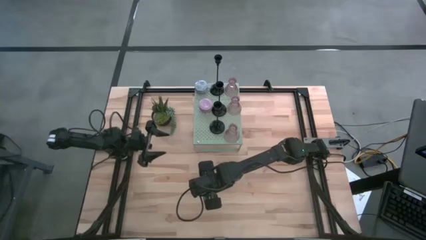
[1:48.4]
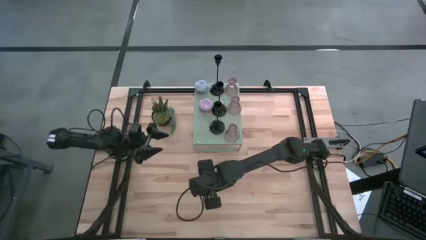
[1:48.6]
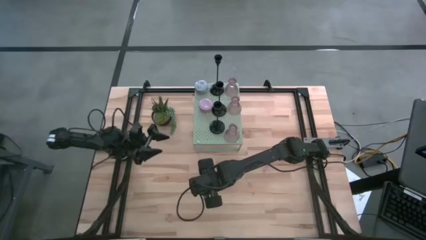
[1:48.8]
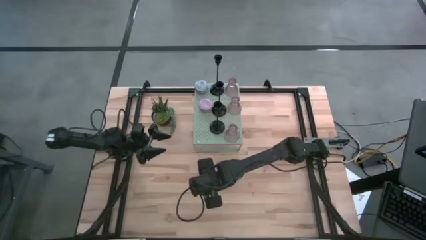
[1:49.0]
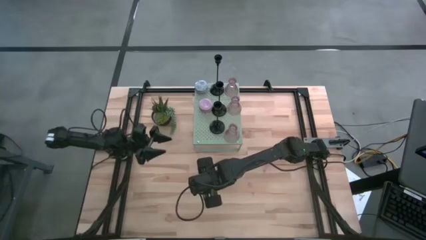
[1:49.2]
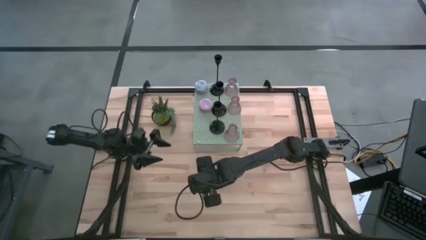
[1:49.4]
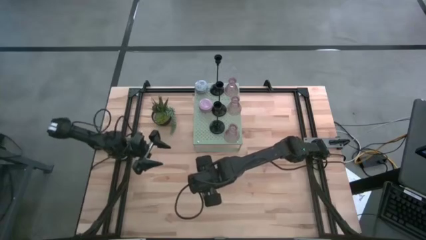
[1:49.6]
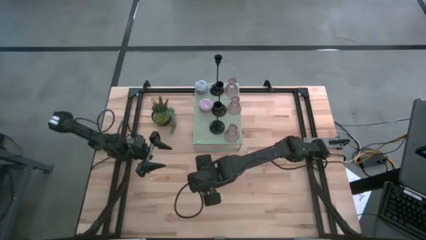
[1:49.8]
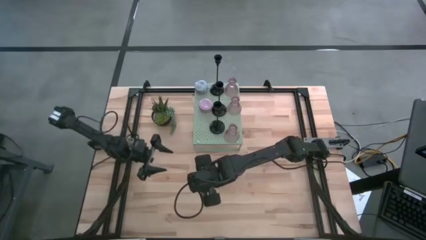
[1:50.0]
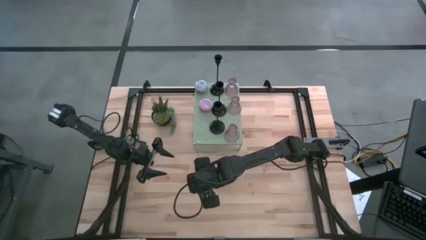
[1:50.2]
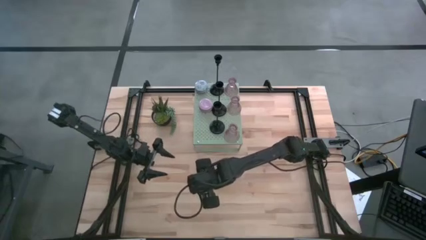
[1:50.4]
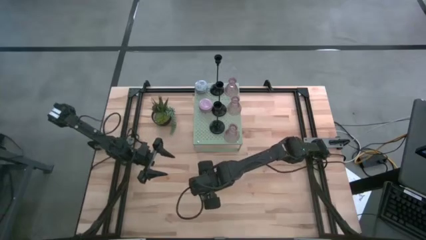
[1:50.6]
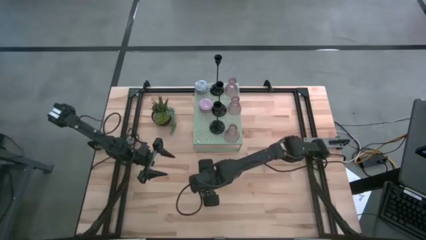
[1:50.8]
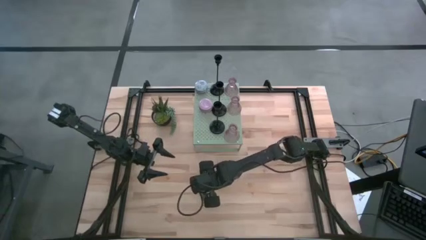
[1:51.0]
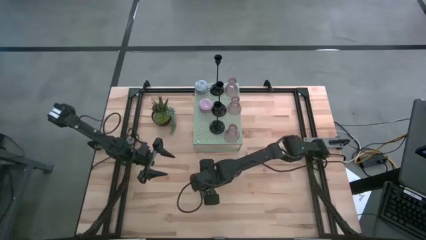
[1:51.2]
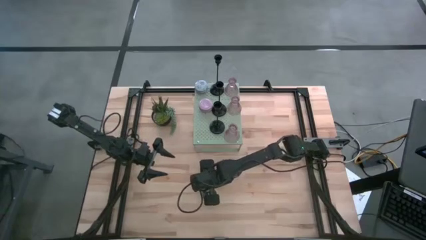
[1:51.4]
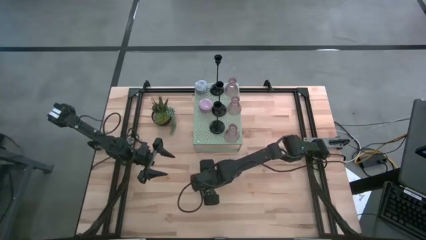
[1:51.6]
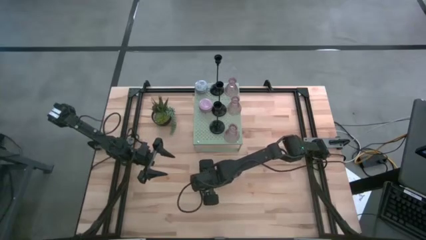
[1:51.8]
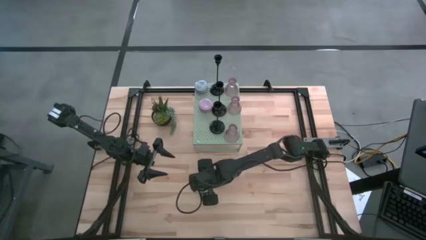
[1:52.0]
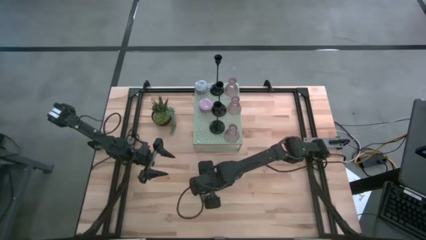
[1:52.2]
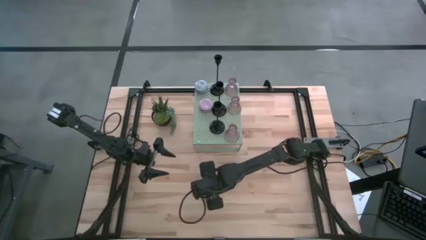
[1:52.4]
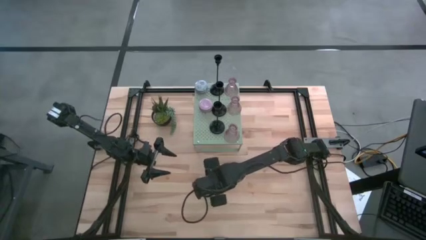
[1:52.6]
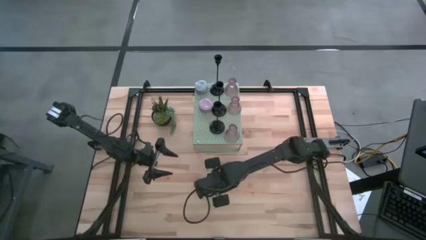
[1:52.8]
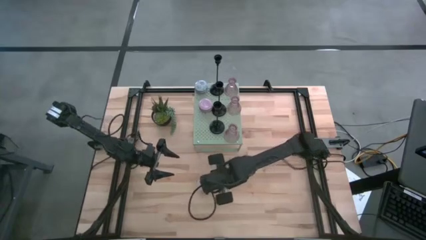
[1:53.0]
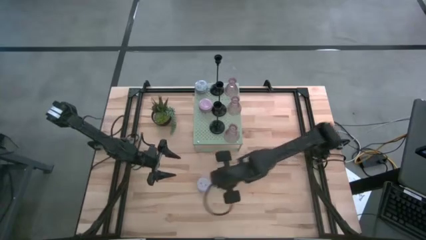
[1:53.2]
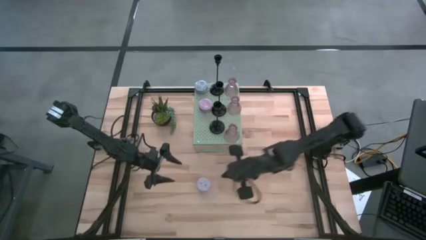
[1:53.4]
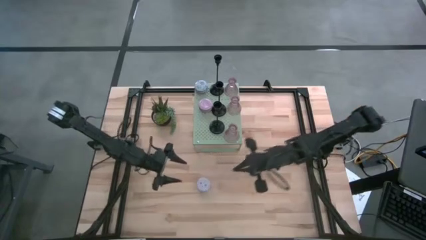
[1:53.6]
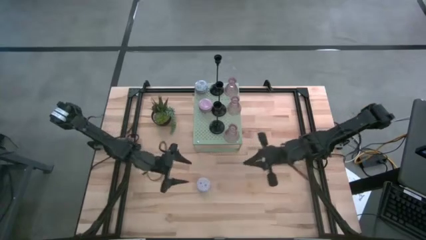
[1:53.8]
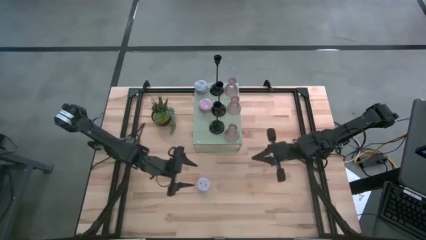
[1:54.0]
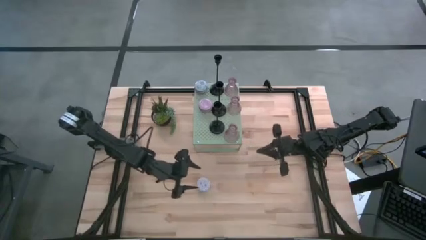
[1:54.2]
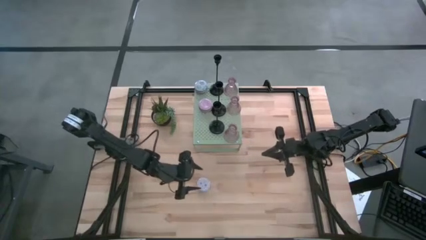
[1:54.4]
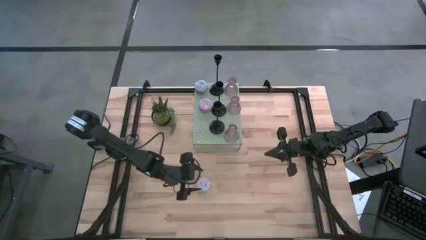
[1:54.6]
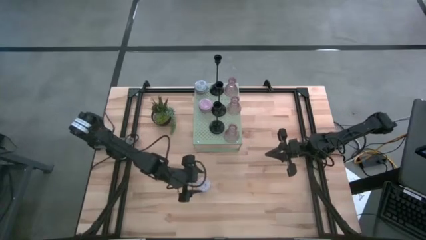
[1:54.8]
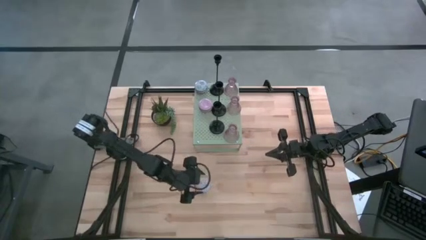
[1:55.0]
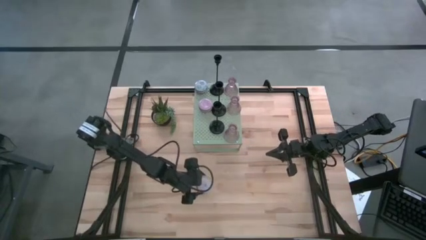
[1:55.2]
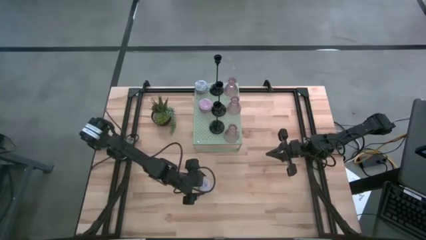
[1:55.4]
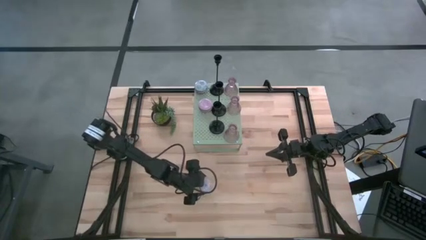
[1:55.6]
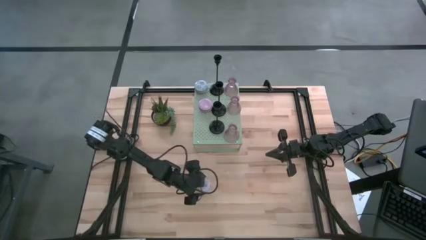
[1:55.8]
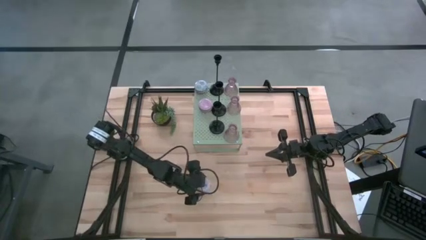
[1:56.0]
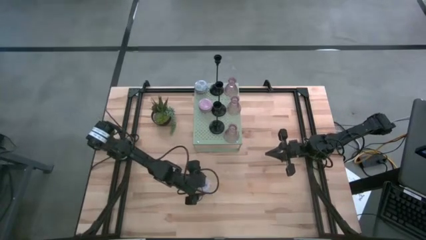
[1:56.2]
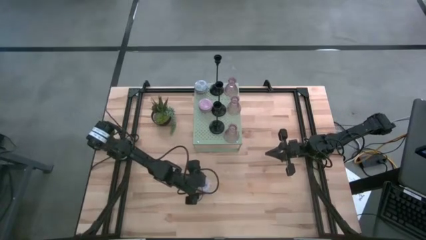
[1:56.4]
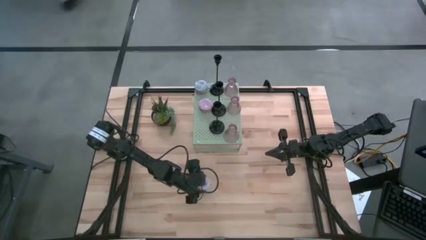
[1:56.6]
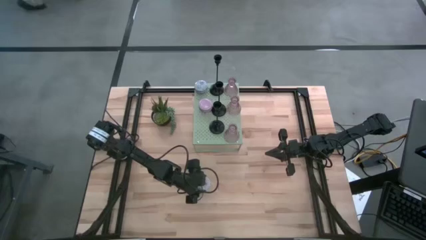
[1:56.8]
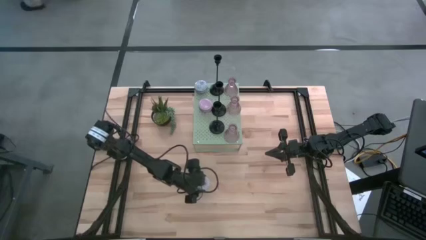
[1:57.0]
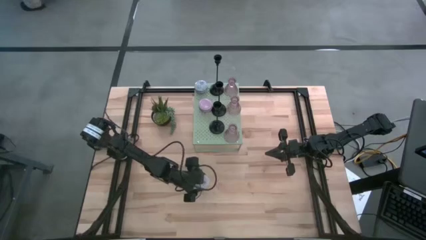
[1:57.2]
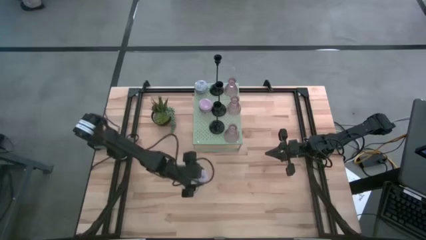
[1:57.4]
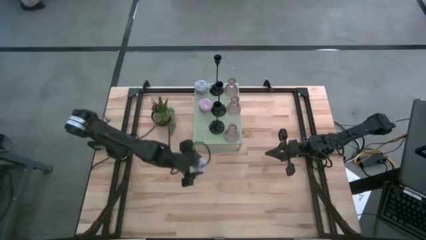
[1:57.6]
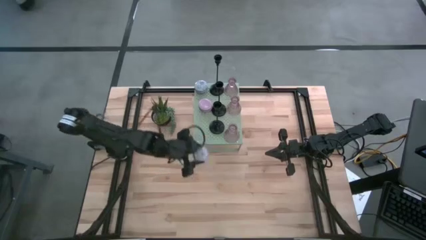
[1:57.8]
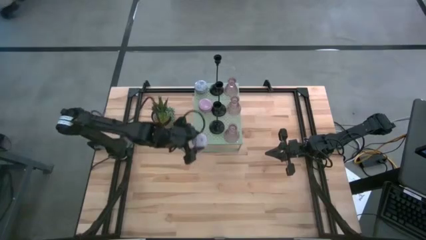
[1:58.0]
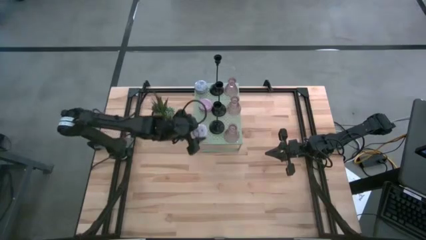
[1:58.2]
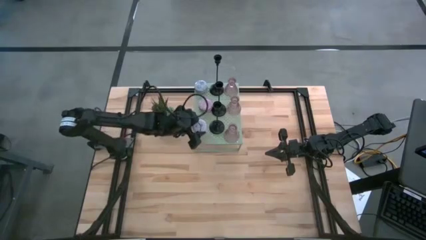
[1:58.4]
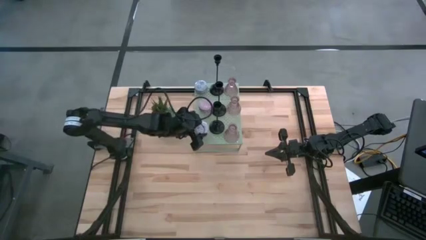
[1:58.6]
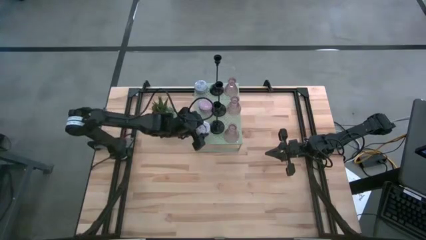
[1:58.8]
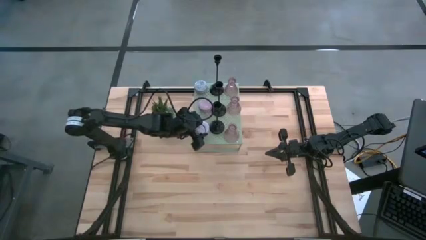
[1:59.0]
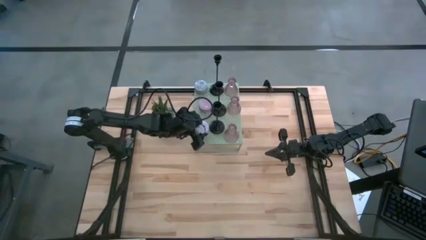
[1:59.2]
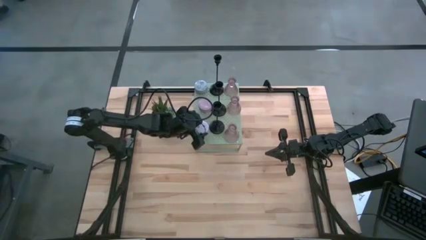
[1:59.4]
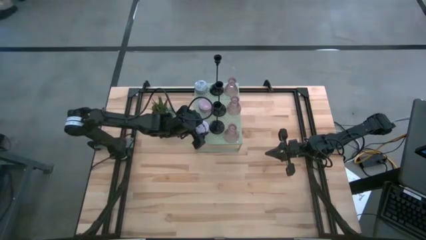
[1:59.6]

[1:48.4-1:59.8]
Task: Pick & Place candle stick holders
Put the red patterned scented candle on the shelf

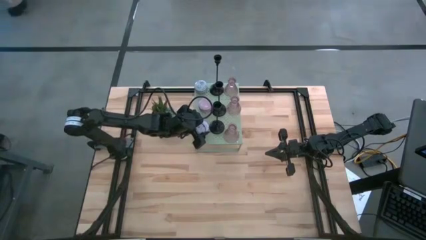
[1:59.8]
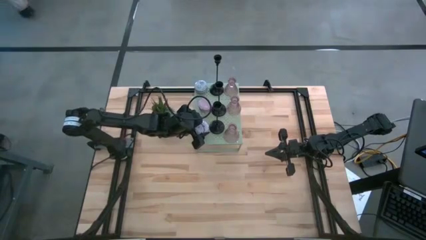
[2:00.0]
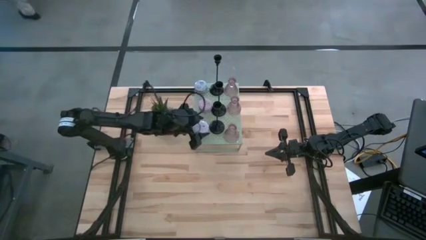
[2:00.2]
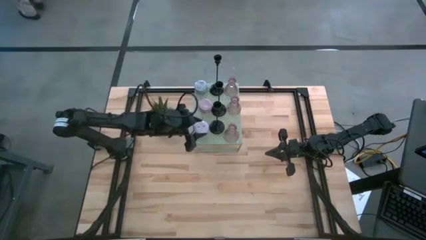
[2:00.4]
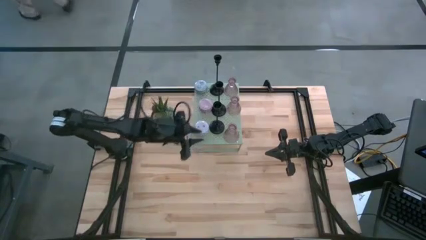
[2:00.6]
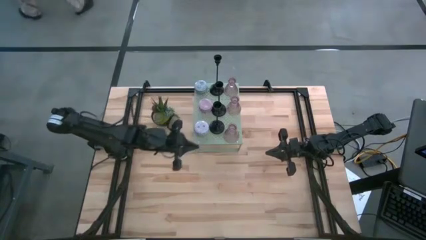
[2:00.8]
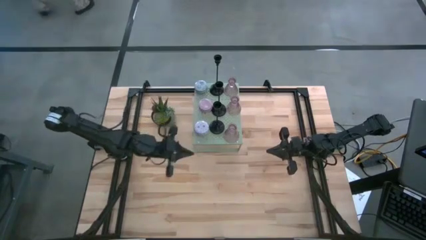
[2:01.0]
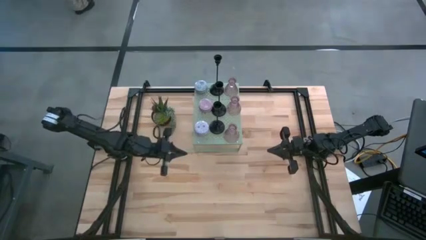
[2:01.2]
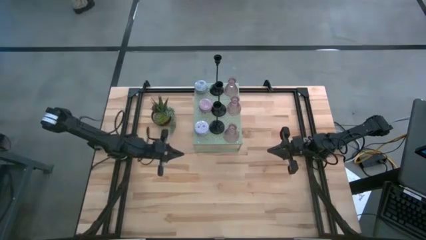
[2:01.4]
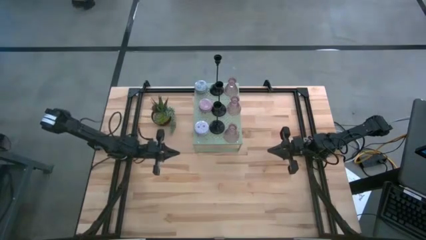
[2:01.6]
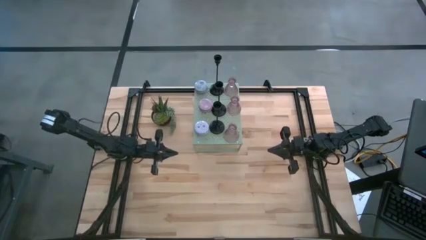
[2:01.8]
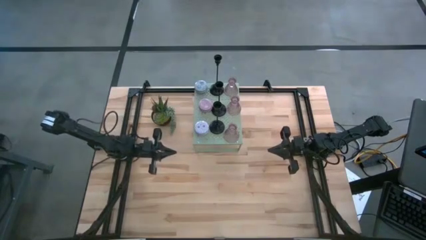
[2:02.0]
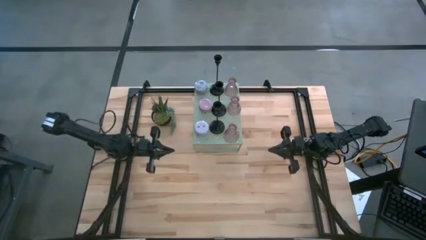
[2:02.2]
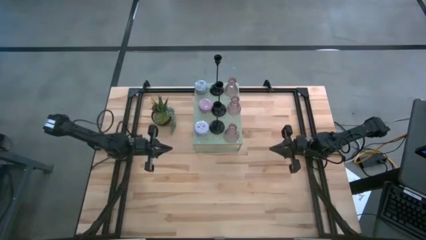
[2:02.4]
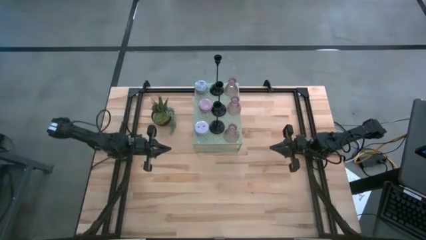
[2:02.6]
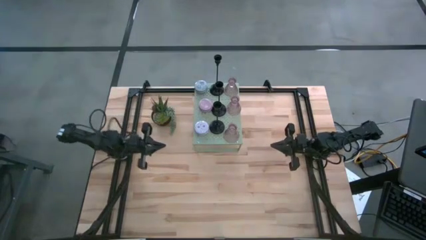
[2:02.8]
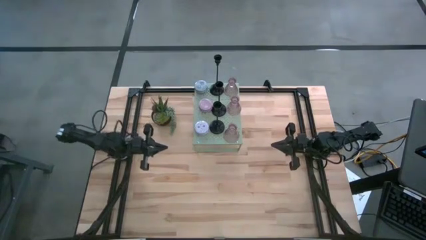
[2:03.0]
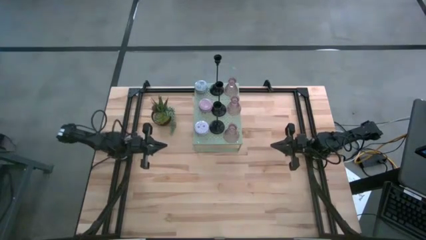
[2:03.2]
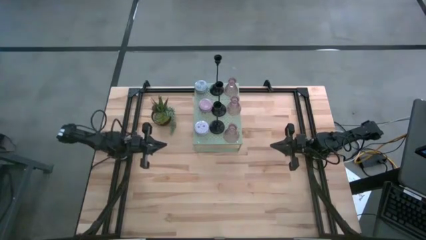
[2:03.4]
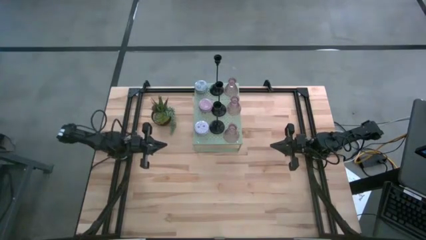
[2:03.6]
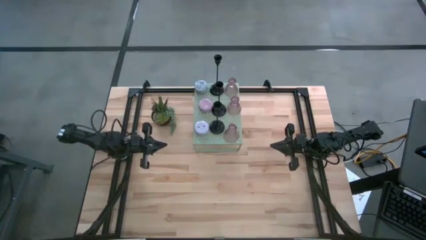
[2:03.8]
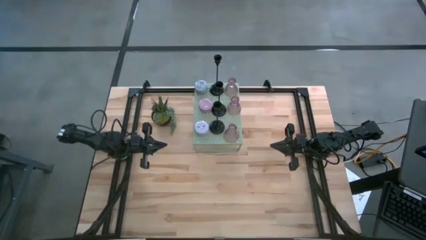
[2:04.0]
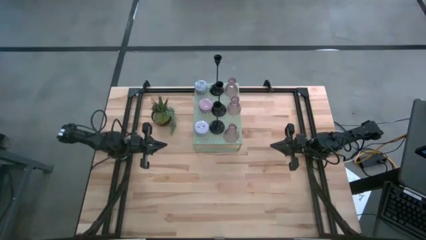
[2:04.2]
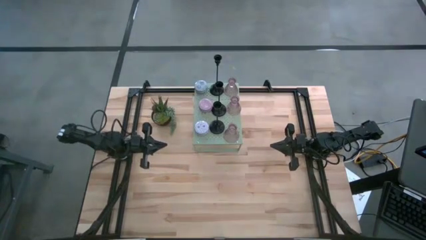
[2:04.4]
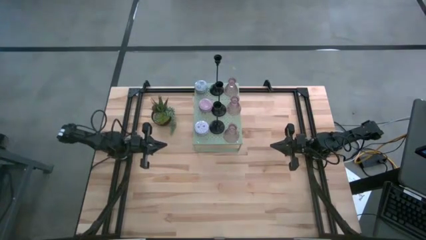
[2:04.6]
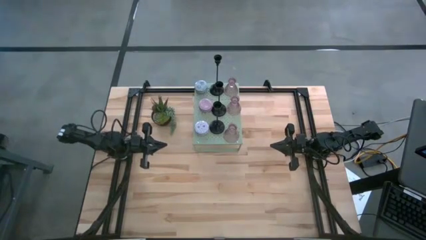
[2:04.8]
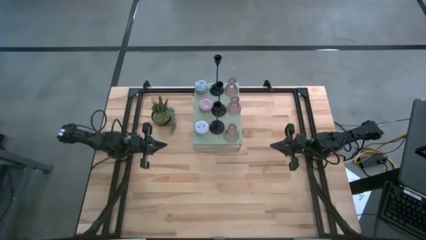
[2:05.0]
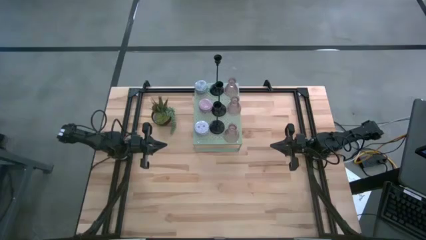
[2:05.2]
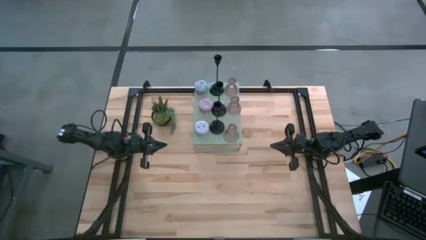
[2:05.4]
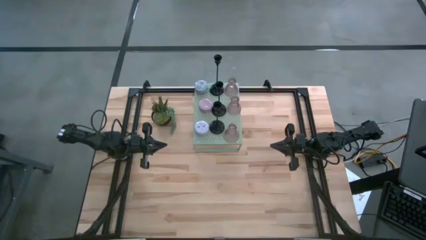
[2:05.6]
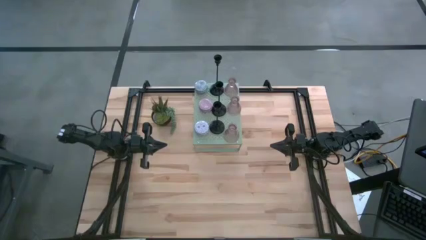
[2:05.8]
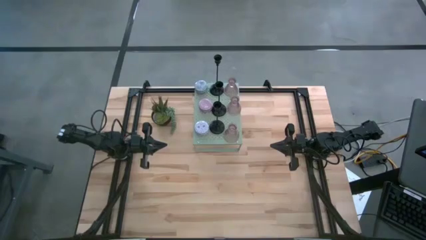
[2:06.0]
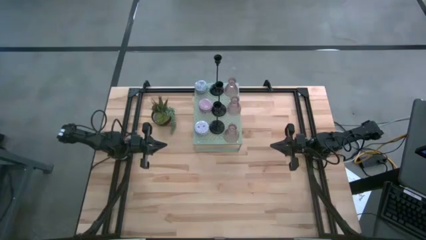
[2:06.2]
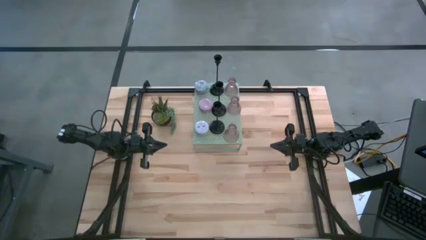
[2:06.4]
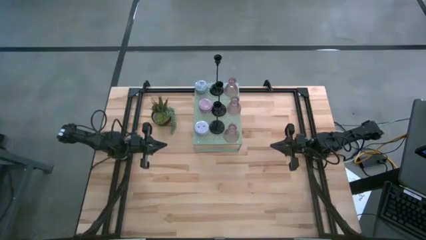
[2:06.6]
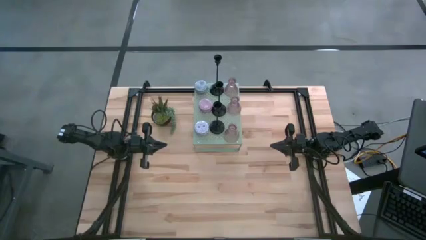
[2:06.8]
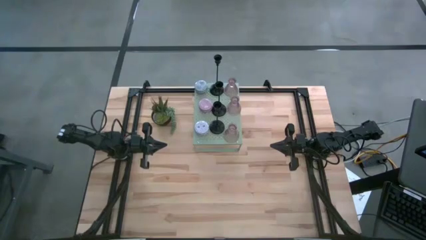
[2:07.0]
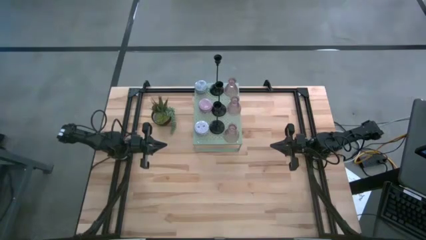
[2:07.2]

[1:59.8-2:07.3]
Return to Home Position
